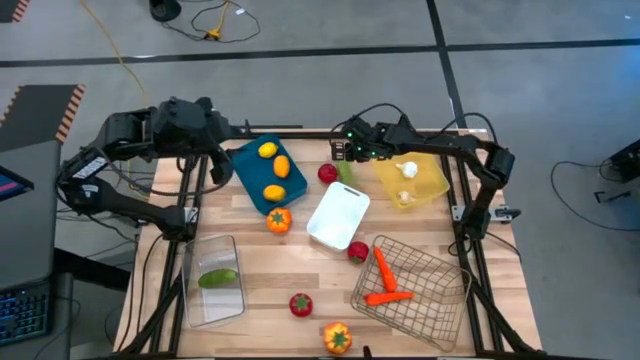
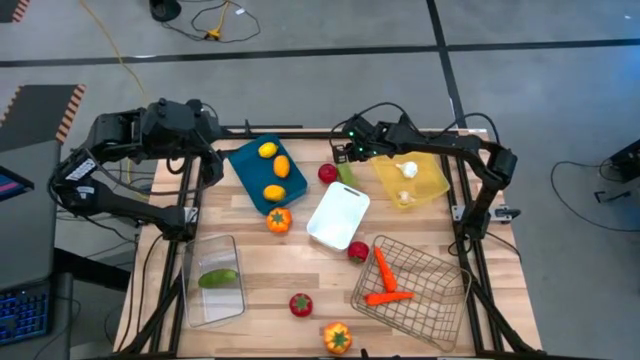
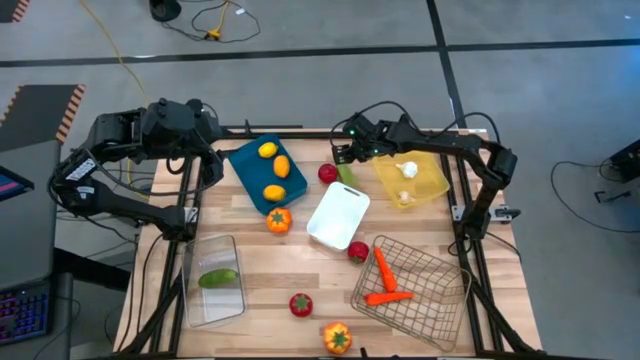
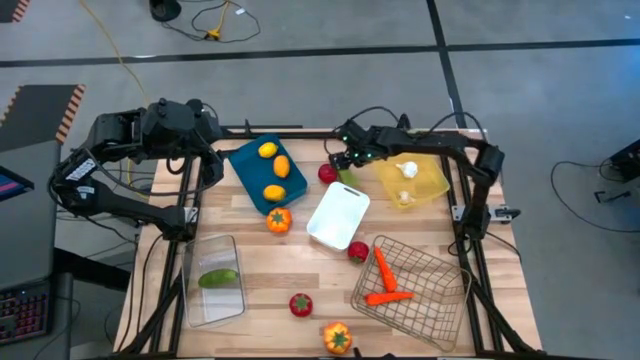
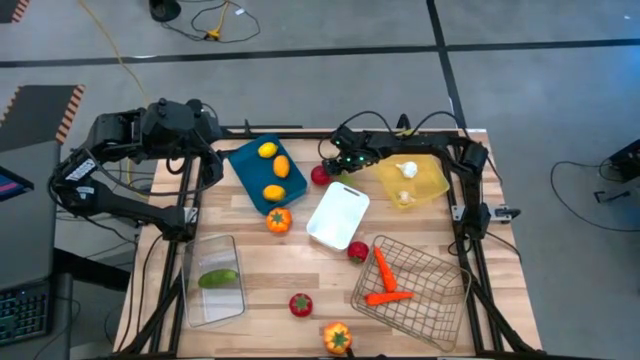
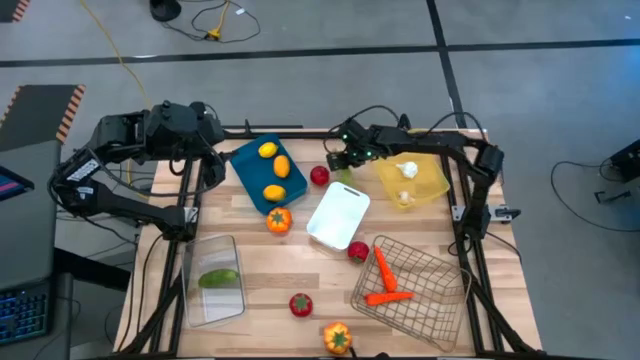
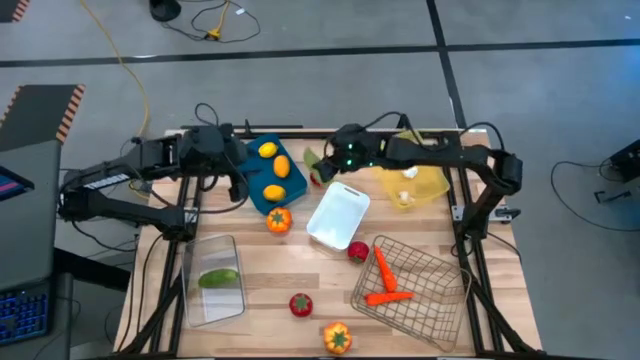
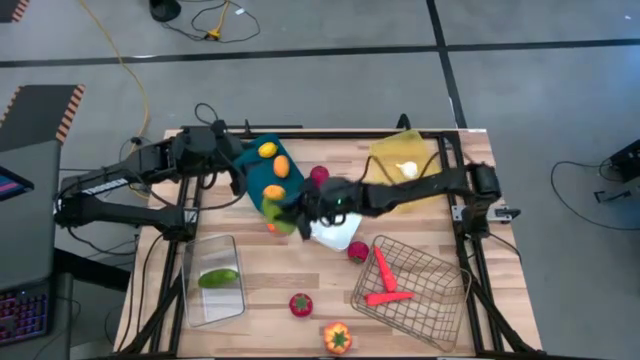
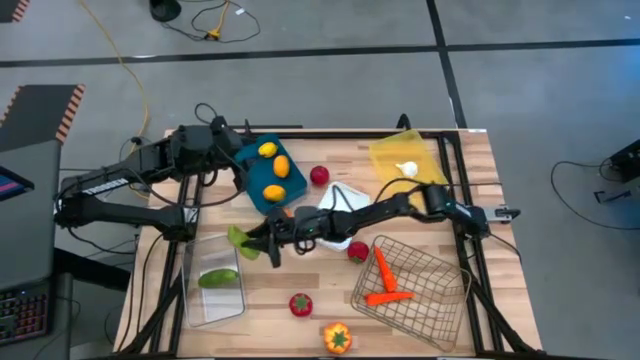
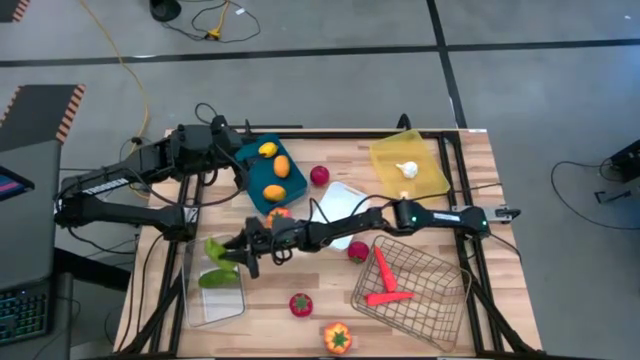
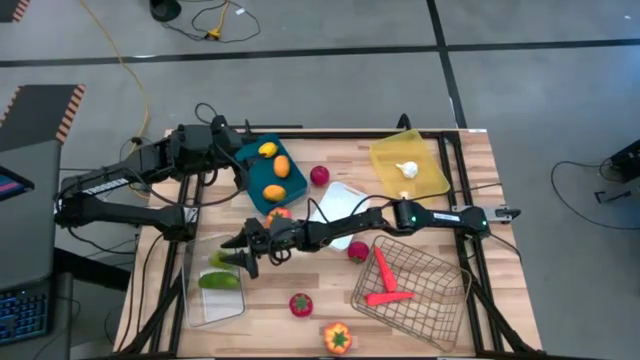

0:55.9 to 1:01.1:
Task: Sort produce into baskets
Put the green cucumber into the transparent bin

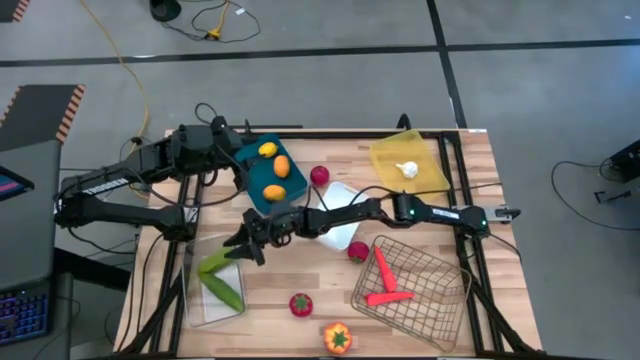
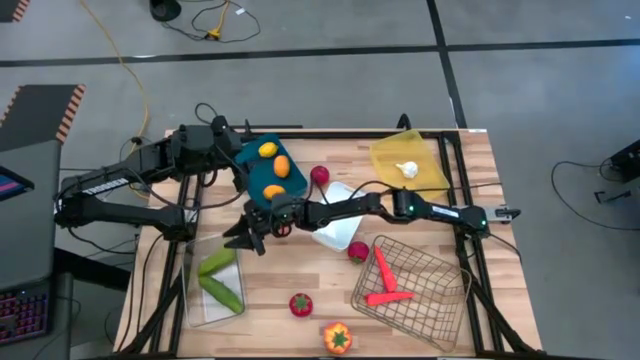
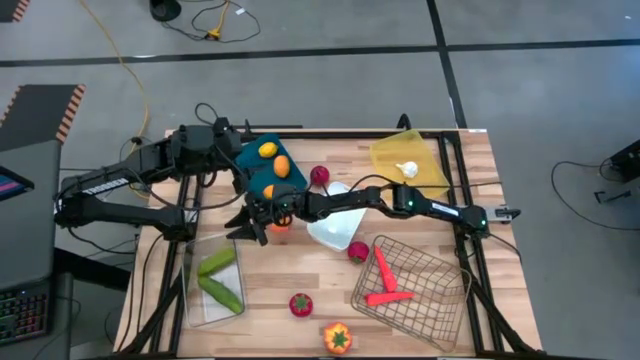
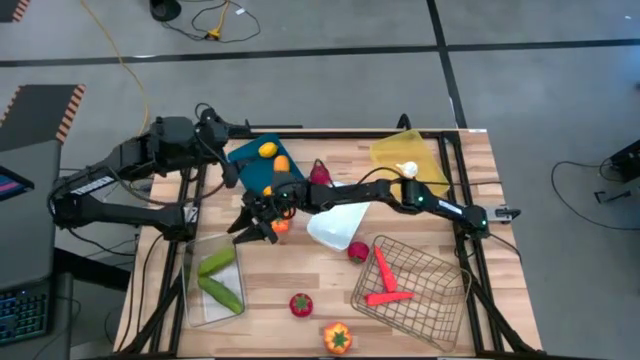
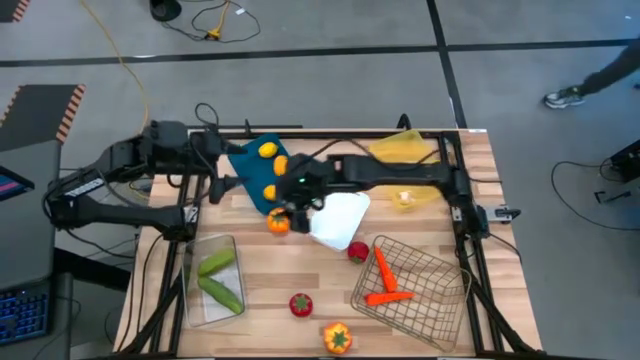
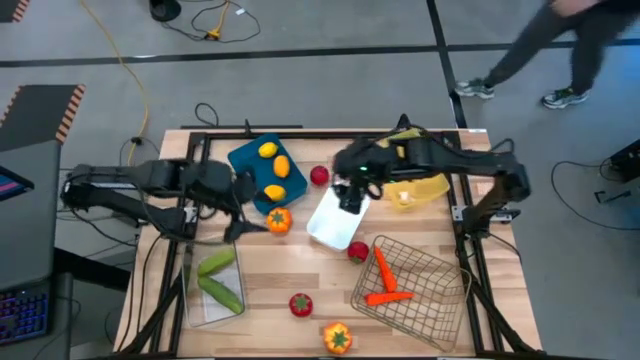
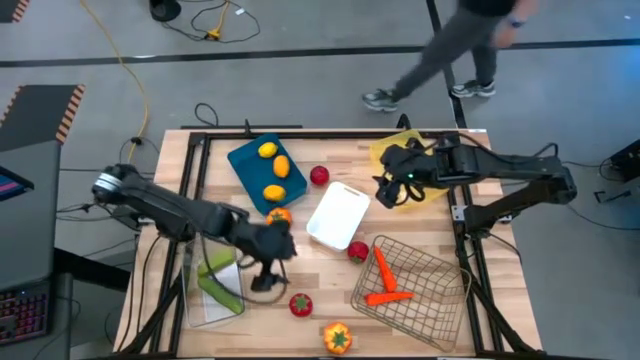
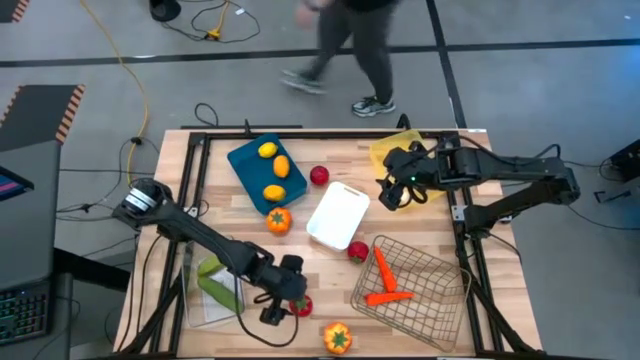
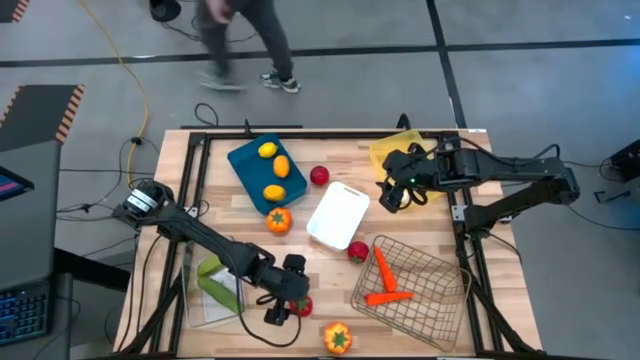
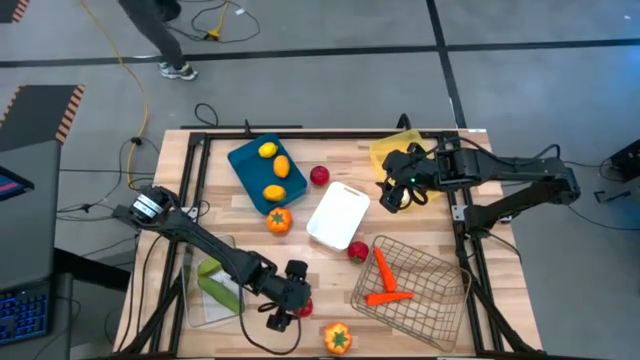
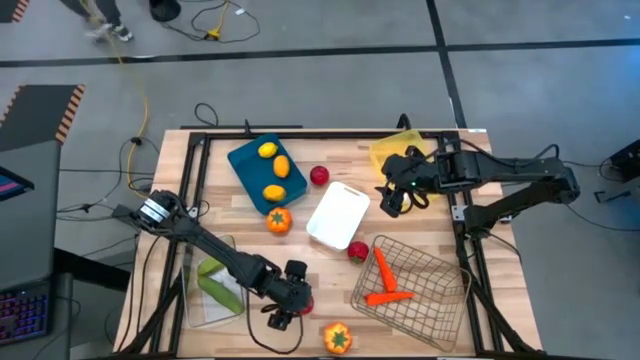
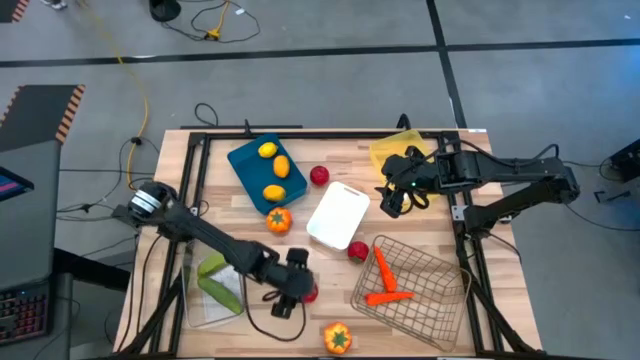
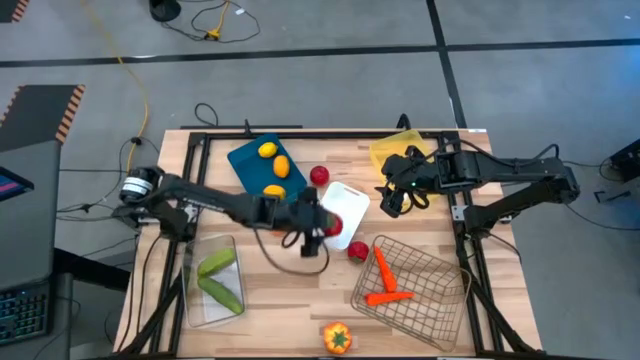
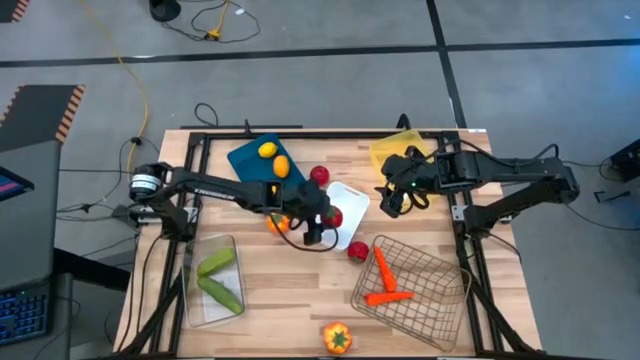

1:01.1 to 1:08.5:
Put the bottom red tomato into the white bin

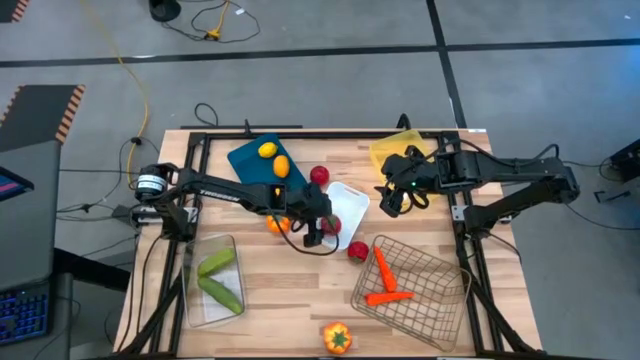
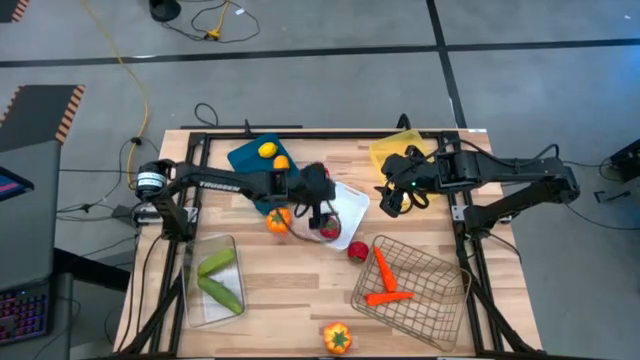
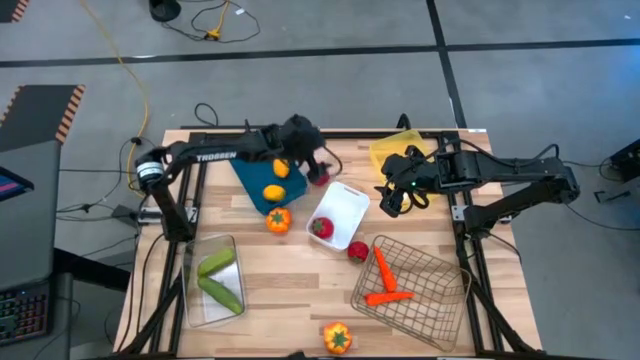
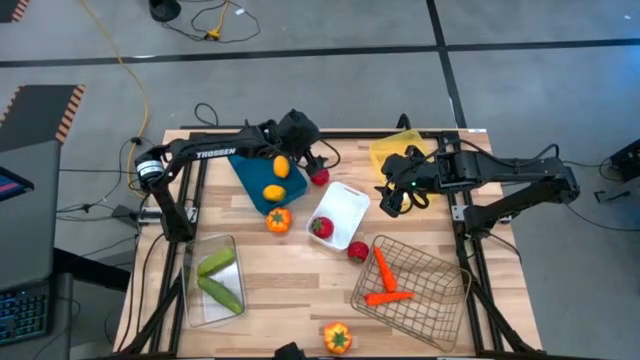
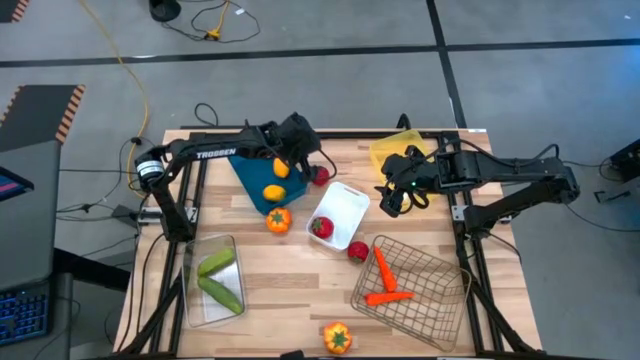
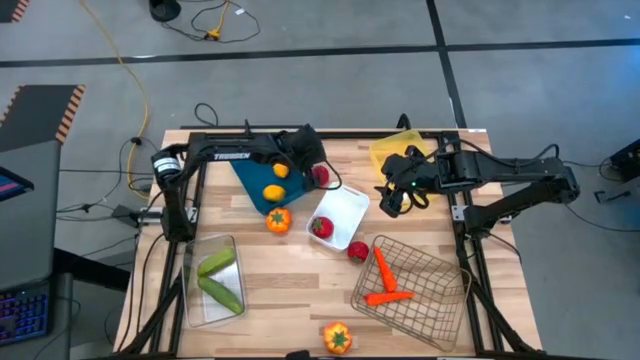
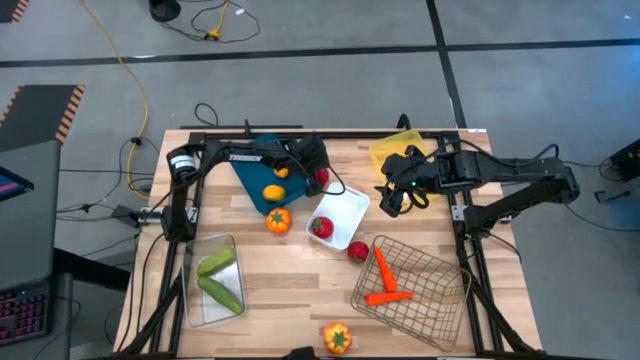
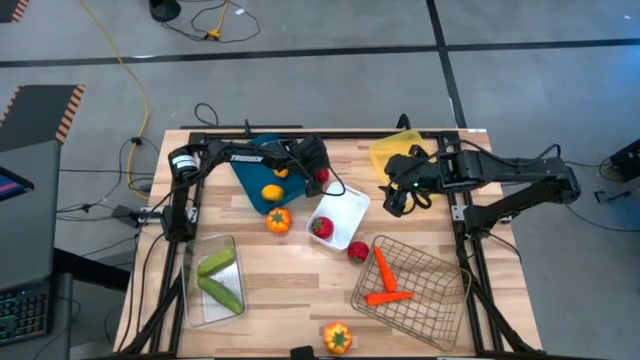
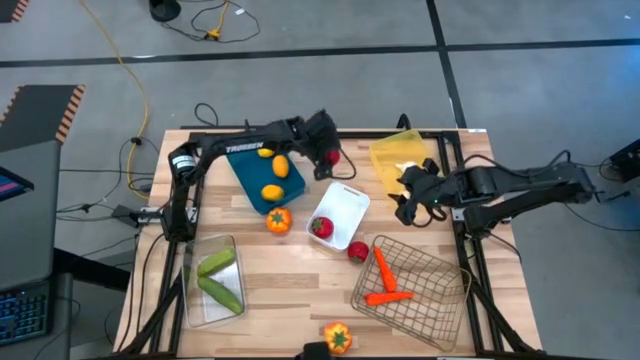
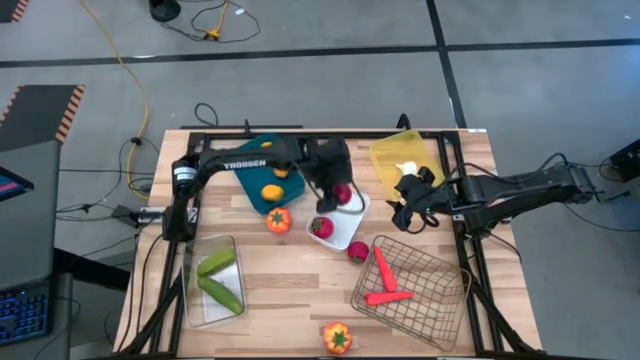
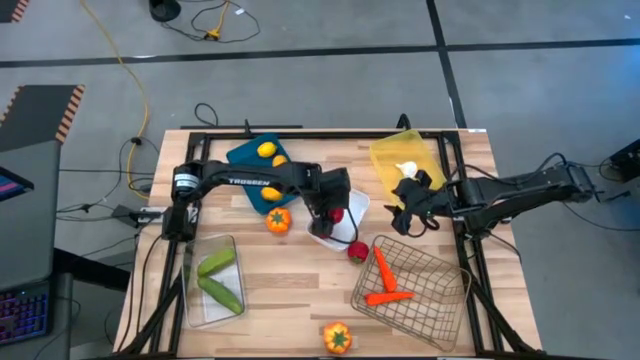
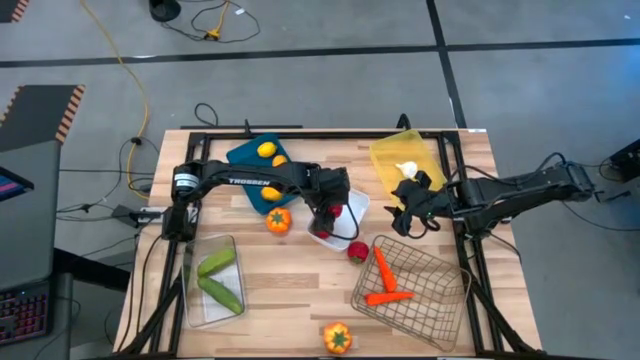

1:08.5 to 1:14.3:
Put the top red tomato into the white bin

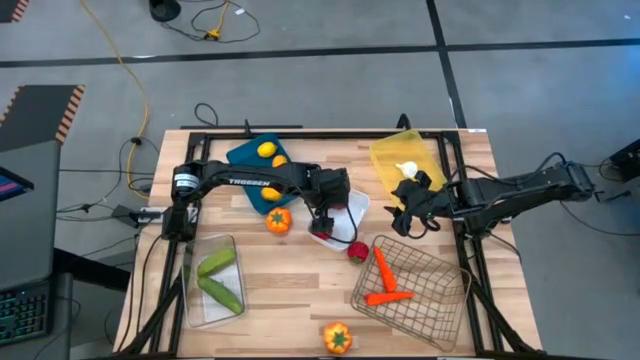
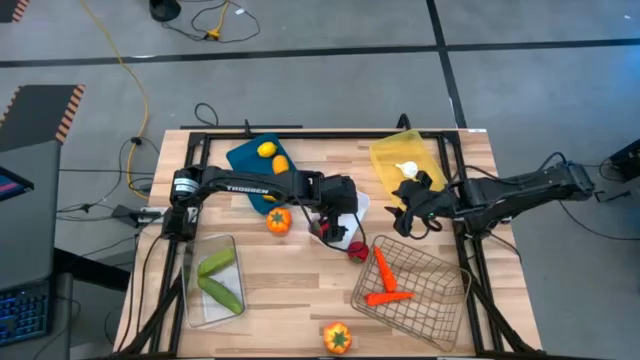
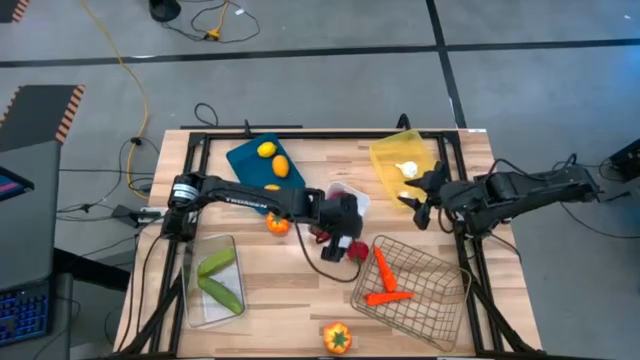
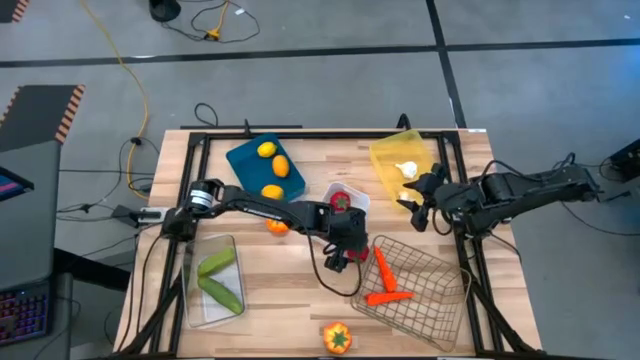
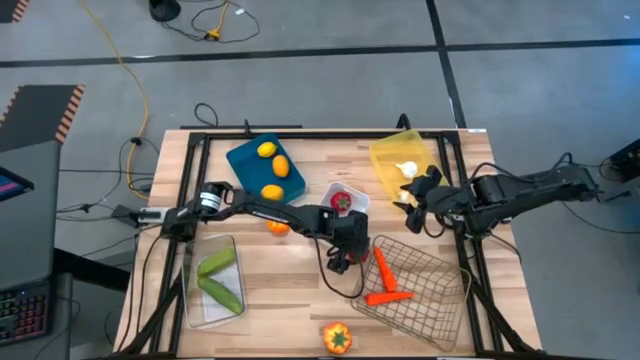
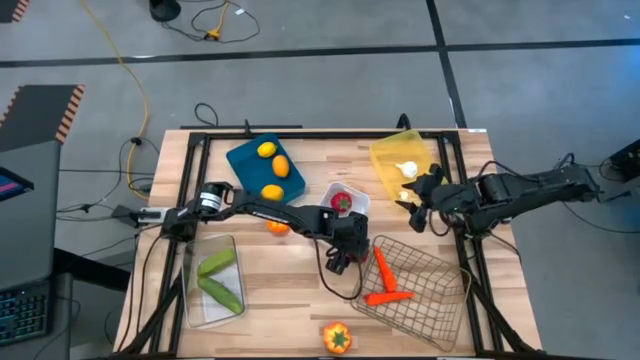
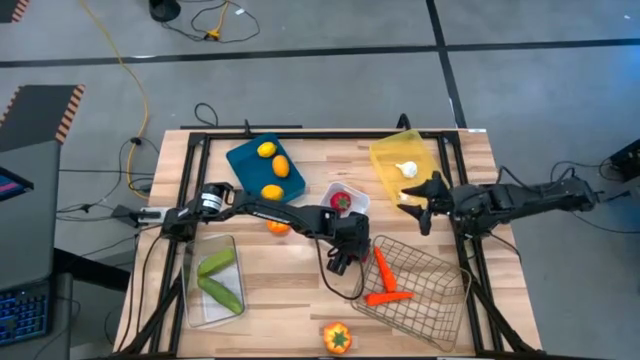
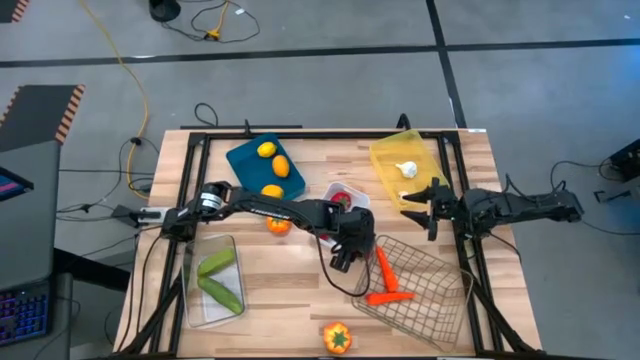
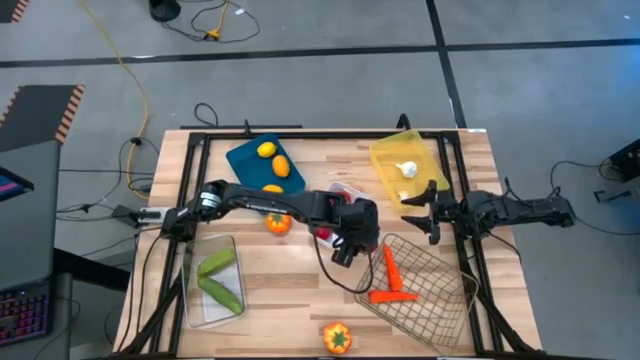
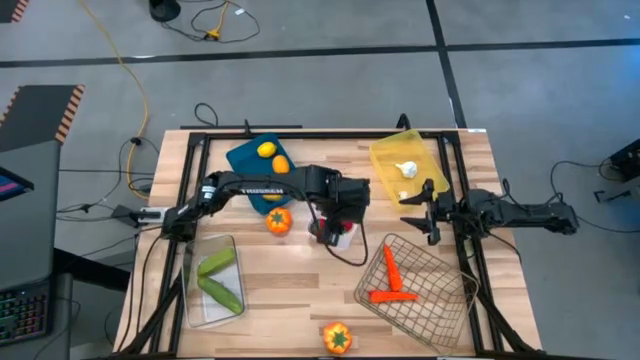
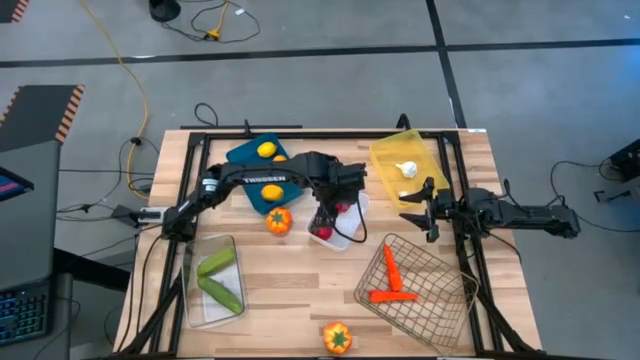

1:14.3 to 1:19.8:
Put the red tomato into the white bin
